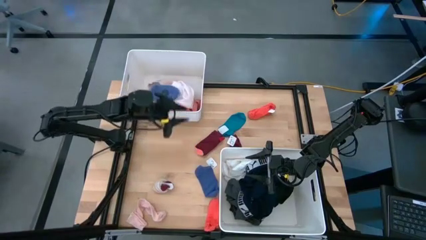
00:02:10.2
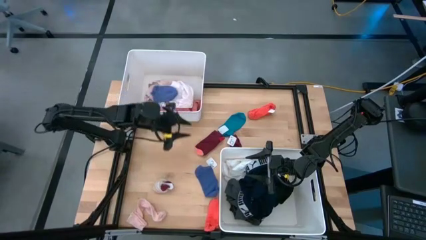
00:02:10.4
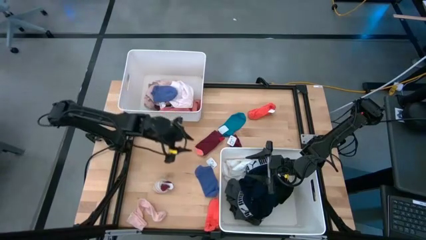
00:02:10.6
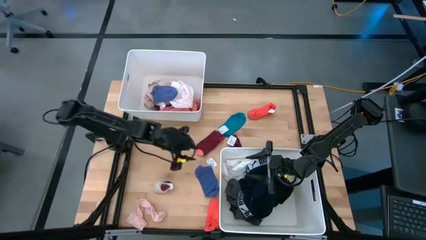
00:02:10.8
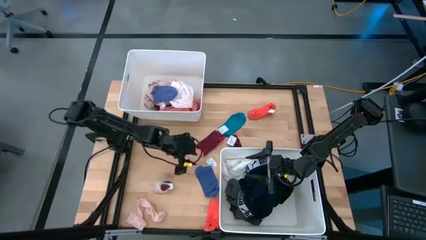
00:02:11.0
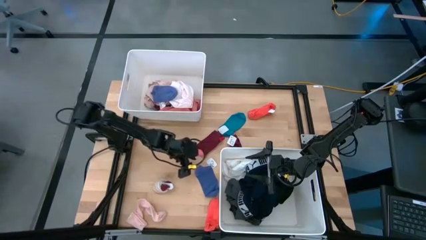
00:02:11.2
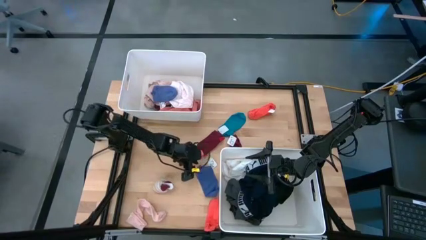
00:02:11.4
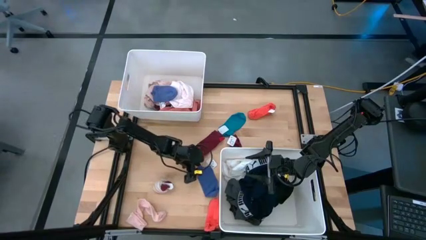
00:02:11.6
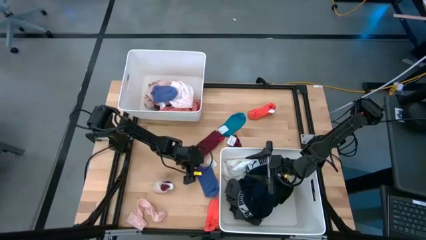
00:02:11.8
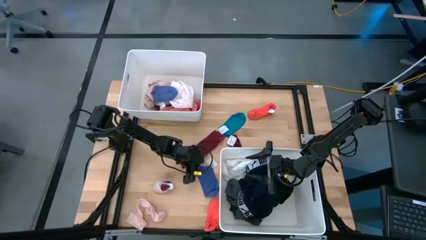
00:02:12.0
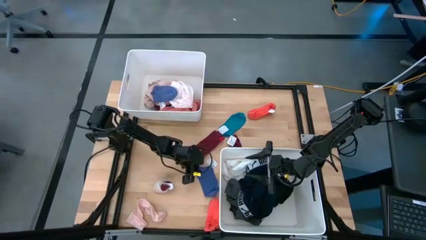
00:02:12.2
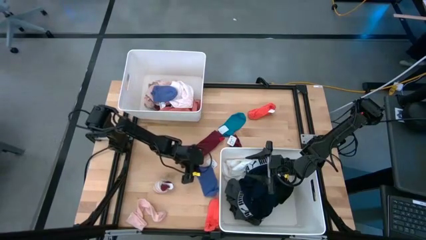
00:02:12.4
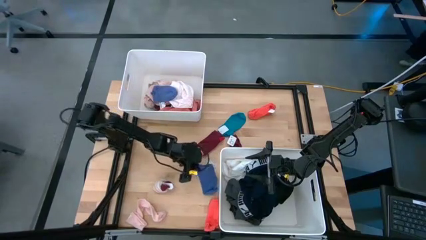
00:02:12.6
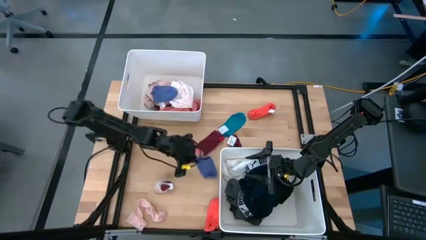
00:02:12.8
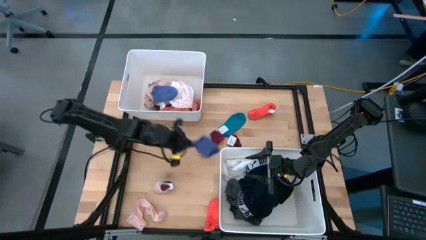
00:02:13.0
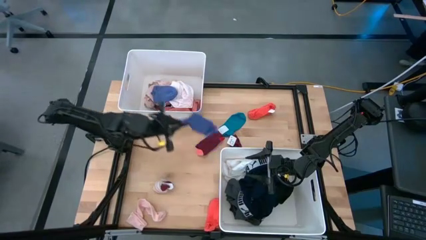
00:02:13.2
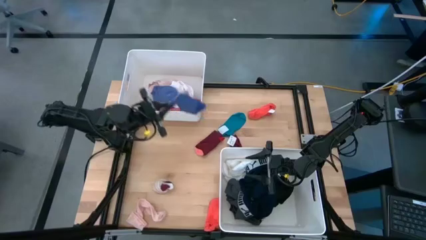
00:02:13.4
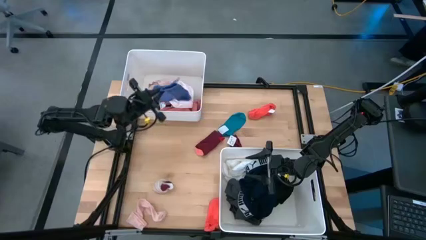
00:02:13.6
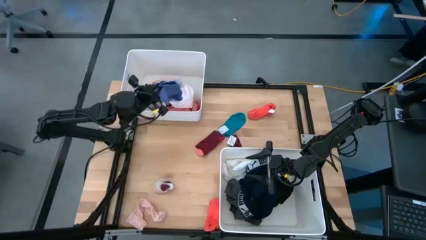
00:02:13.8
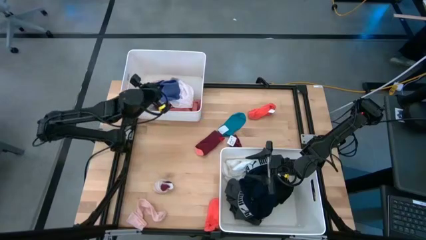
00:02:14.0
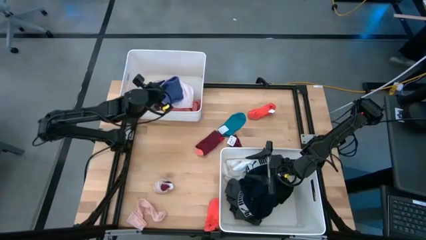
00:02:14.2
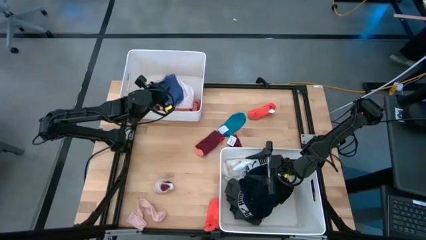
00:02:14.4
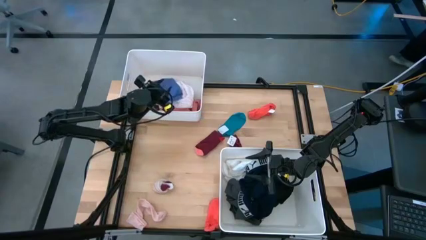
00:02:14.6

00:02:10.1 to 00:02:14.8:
Task: Sort clothes
Put the blue sock into the top white bin

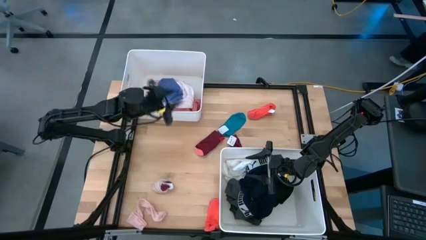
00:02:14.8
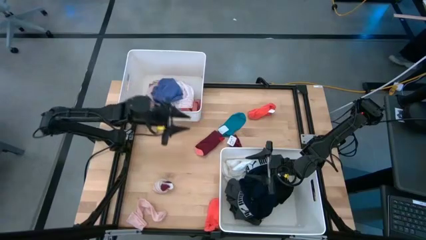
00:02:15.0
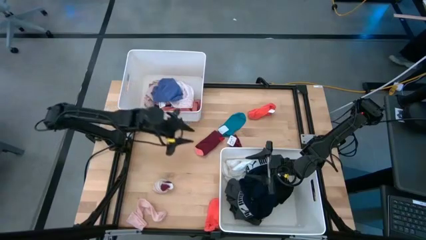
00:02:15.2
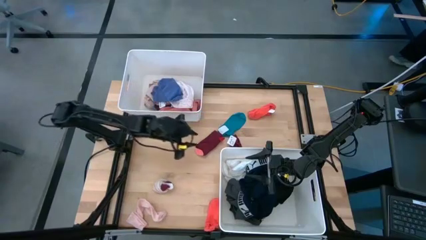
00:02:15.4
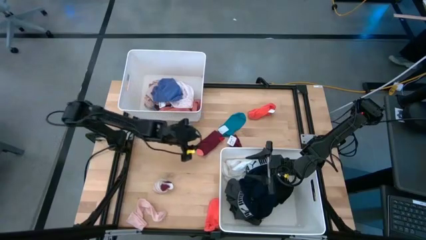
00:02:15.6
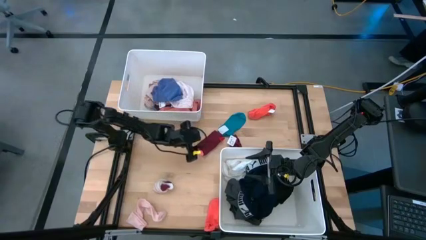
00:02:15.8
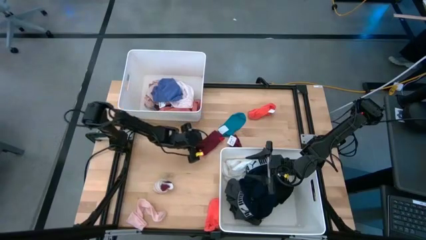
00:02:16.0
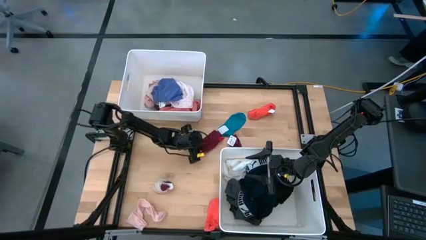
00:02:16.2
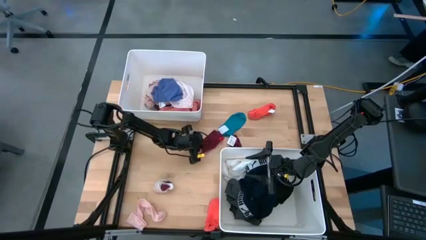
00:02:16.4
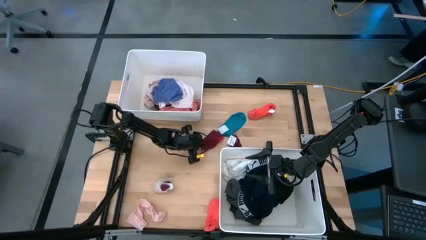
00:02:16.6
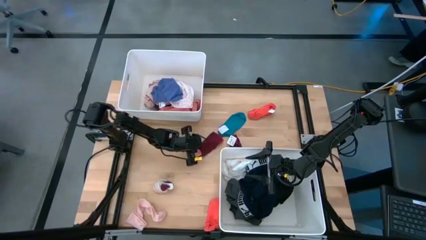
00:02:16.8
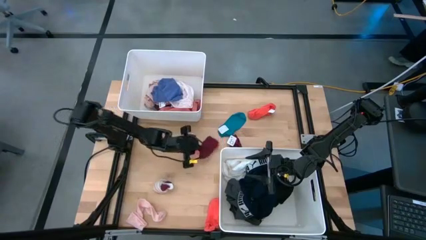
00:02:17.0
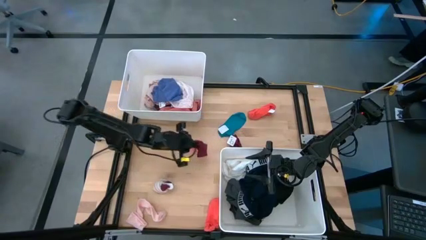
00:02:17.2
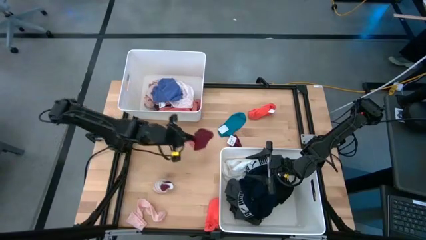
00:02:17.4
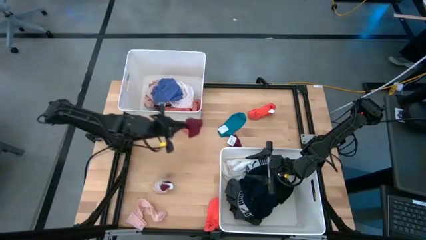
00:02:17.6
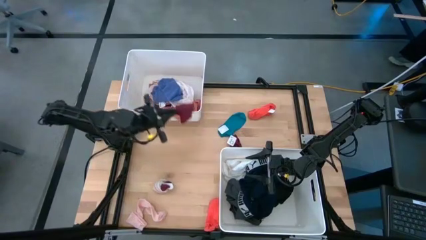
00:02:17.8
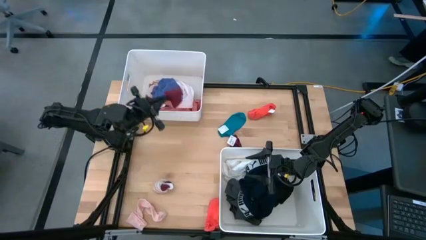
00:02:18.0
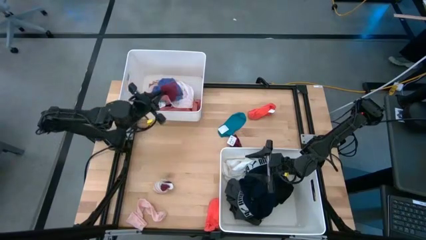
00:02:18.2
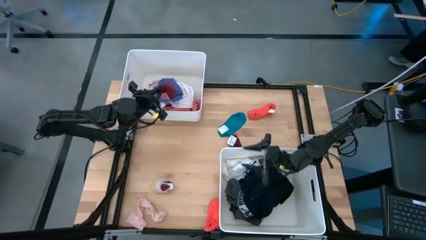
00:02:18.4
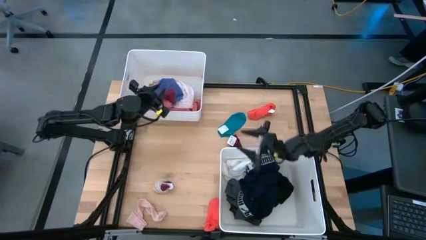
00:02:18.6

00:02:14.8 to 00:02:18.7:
Put the red sock into the top white bin

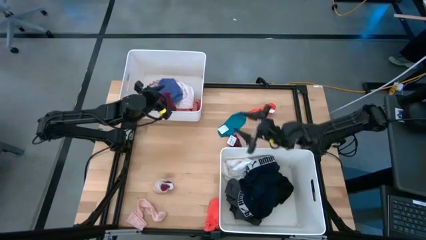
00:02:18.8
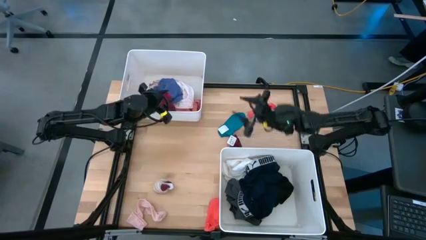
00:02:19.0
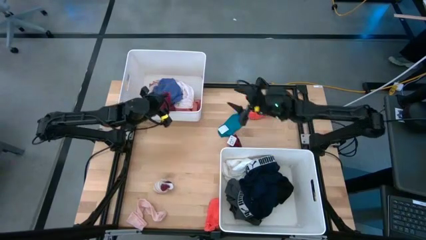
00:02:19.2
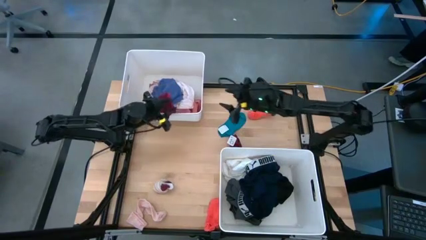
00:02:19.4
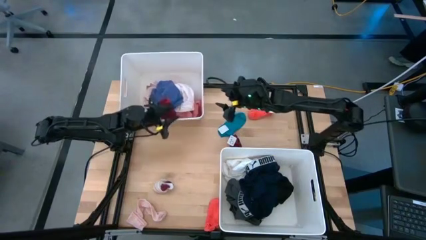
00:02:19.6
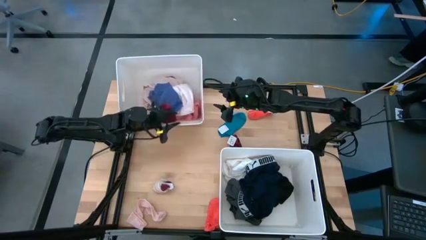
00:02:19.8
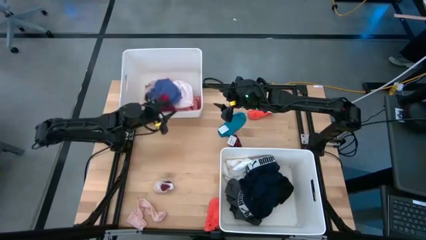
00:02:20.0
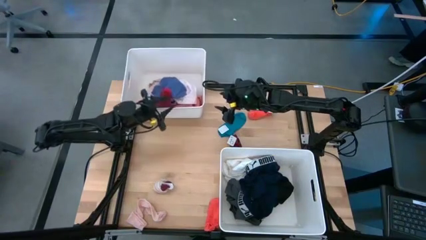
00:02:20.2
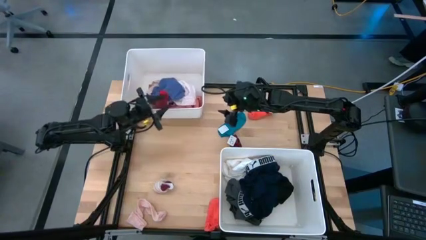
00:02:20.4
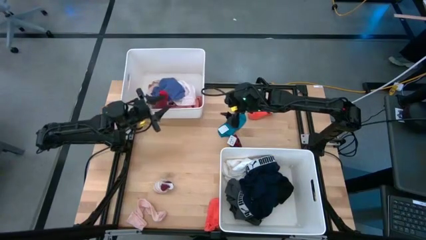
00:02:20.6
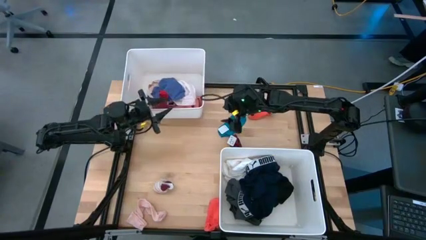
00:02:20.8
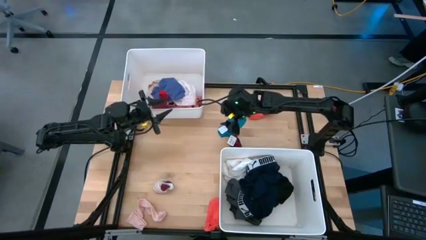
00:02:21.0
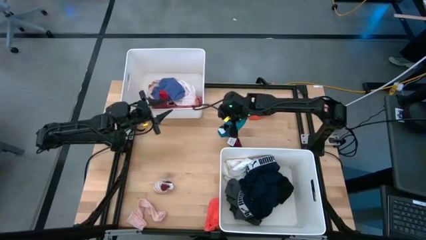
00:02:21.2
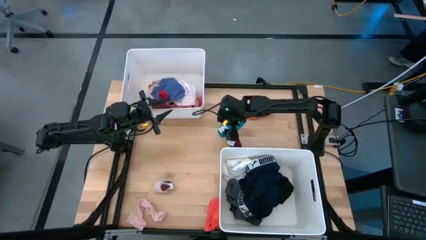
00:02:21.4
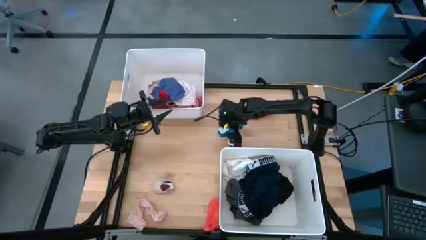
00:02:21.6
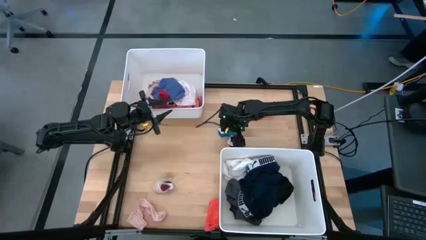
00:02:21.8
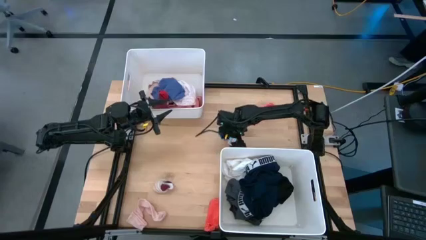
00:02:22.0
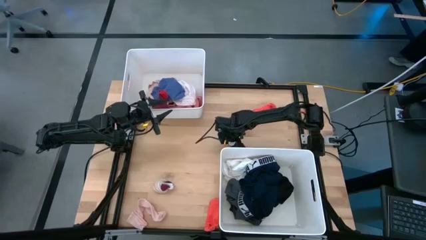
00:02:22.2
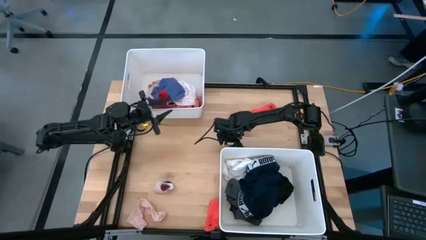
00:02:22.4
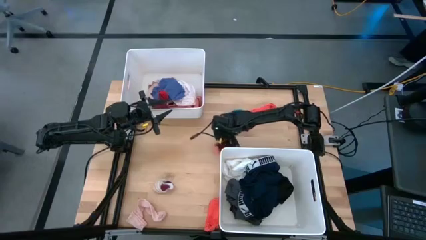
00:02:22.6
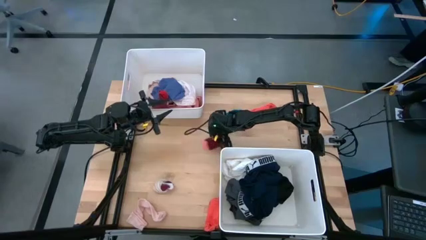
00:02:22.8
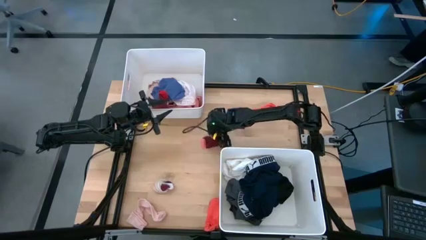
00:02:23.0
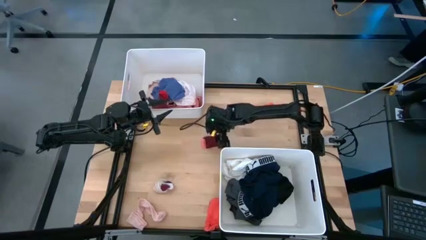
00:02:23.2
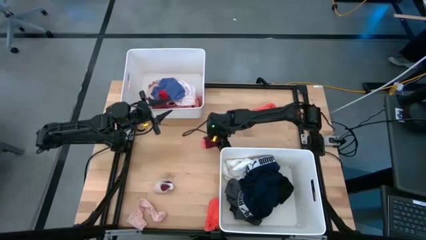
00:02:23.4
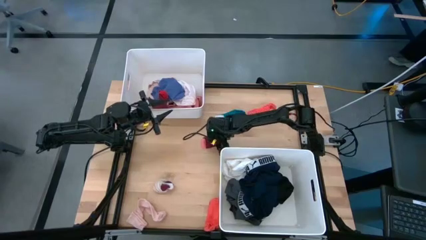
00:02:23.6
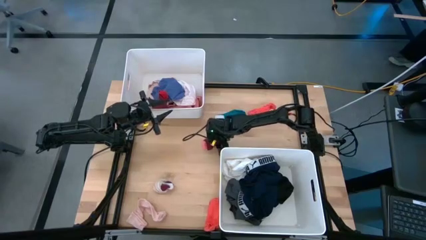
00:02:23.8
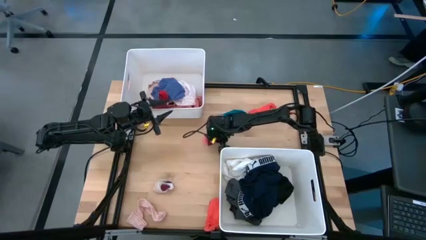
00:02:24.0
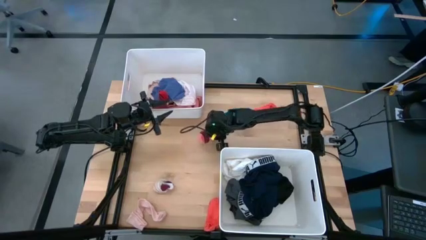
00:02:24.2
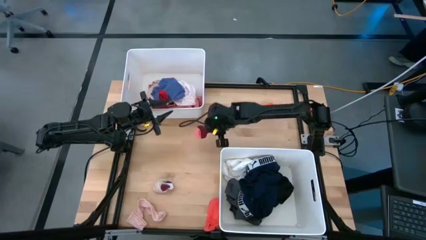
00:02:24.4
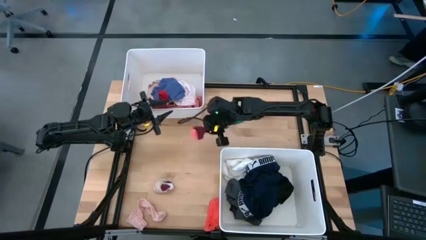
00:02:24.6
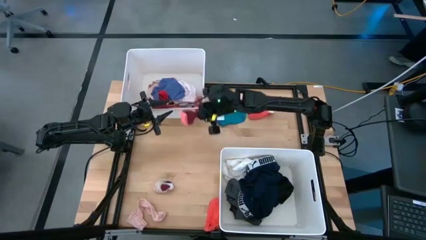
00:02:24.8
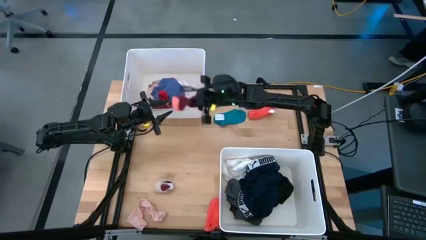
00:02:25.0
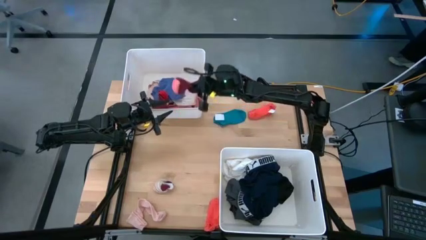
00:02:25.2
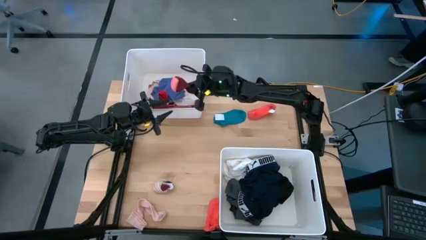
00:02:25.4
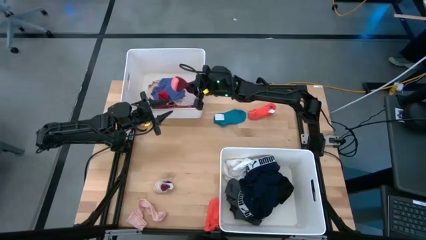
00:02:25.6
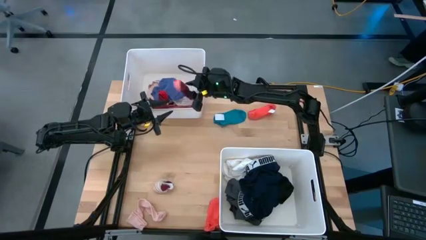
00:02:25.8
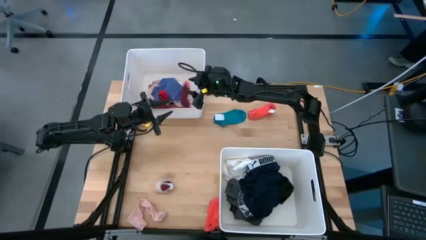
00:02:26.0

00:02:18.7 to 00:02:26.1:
Put the red sock into the top white bin
